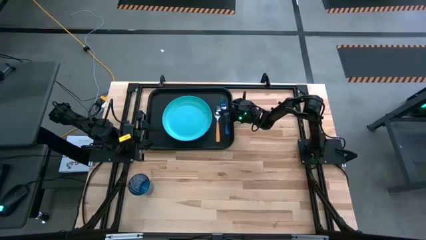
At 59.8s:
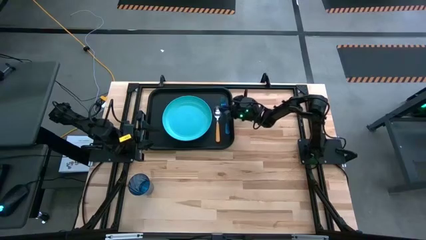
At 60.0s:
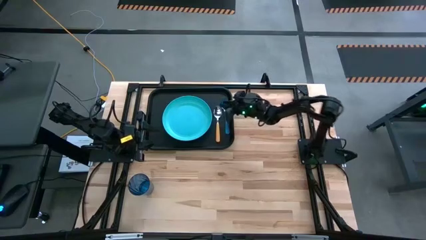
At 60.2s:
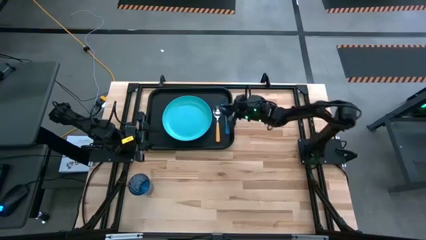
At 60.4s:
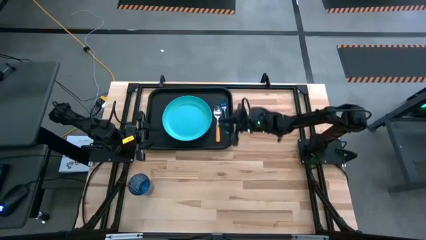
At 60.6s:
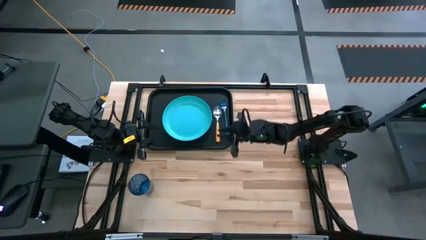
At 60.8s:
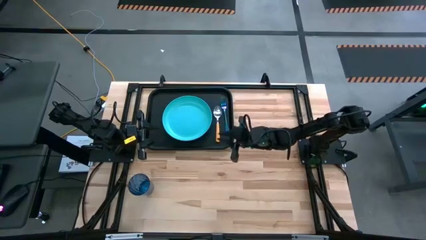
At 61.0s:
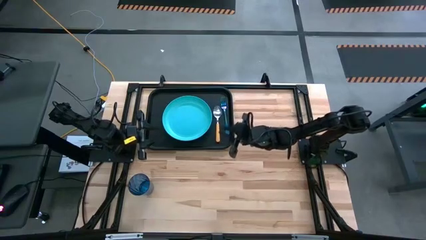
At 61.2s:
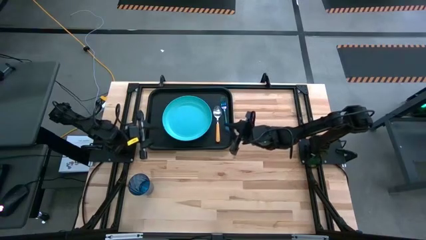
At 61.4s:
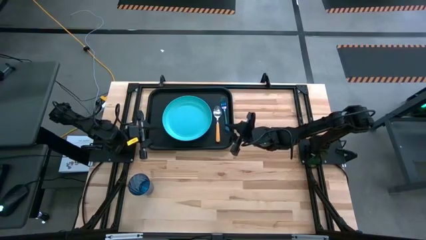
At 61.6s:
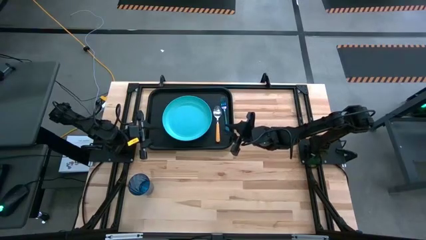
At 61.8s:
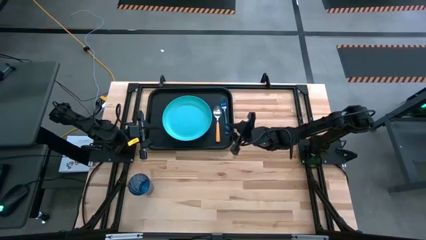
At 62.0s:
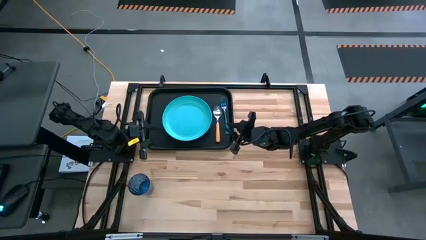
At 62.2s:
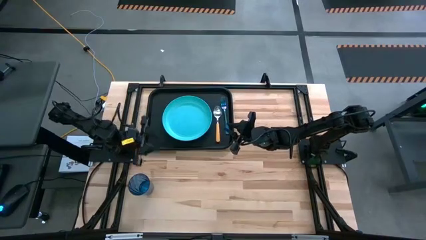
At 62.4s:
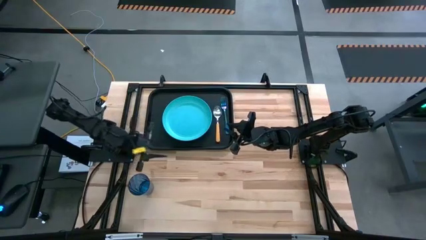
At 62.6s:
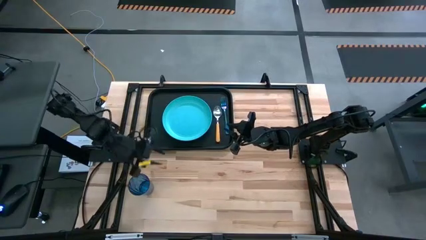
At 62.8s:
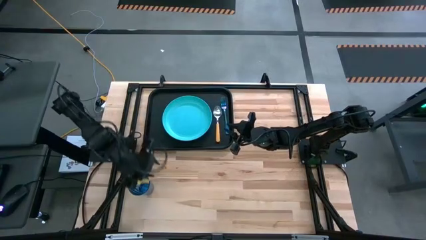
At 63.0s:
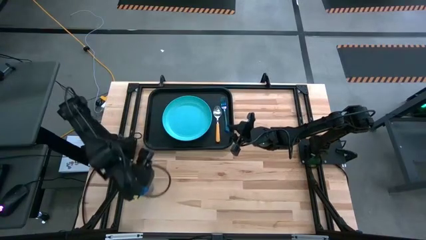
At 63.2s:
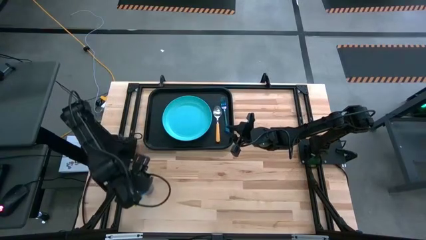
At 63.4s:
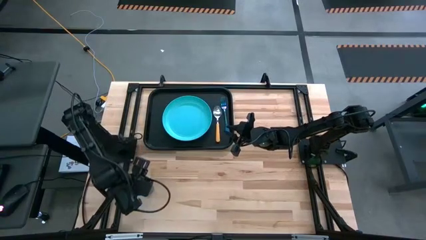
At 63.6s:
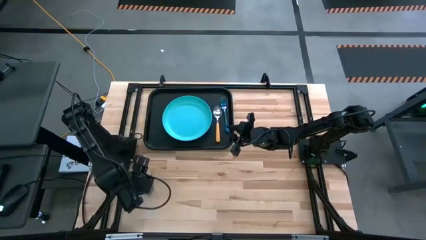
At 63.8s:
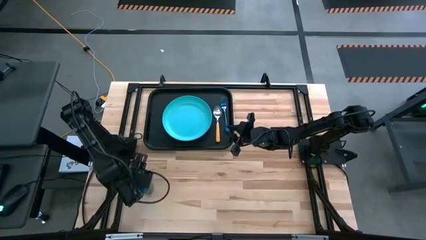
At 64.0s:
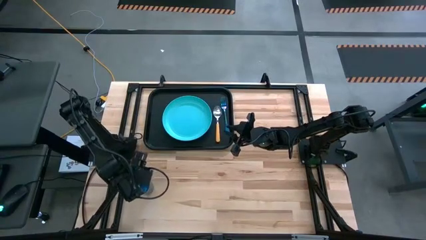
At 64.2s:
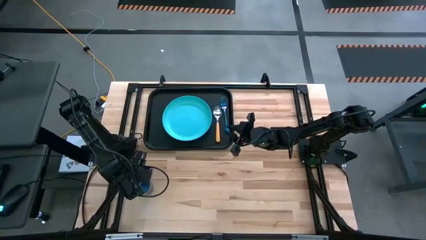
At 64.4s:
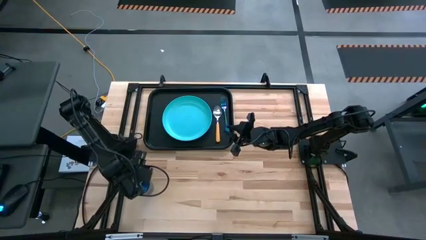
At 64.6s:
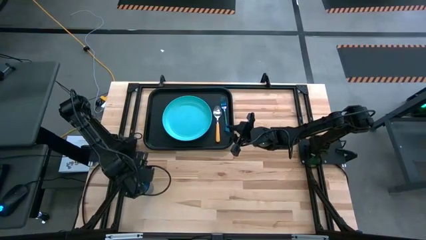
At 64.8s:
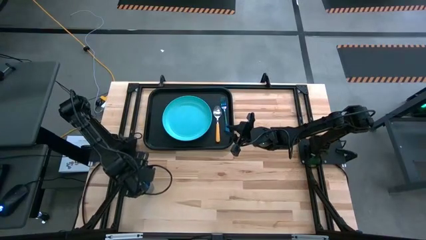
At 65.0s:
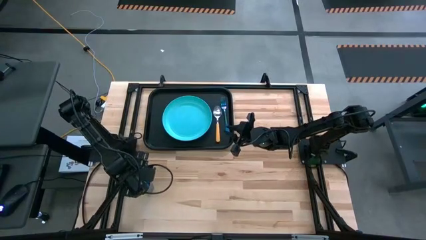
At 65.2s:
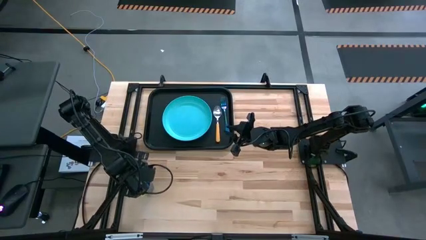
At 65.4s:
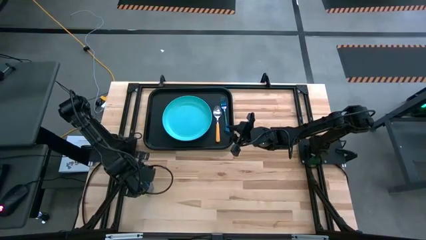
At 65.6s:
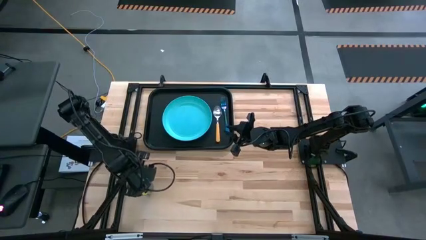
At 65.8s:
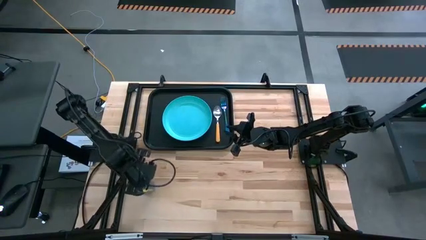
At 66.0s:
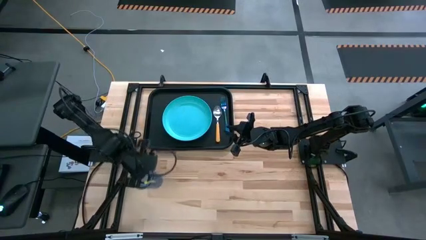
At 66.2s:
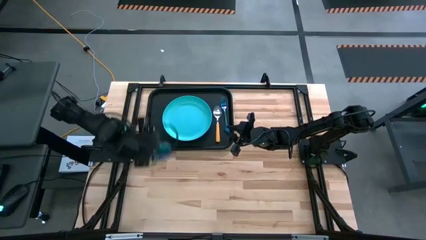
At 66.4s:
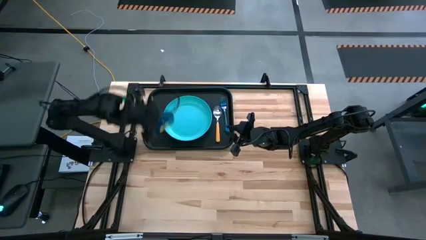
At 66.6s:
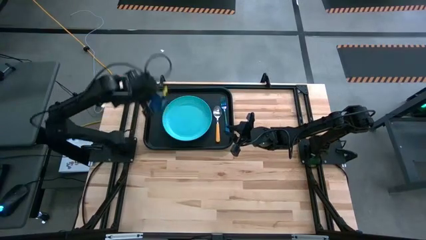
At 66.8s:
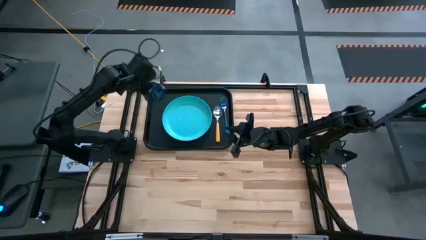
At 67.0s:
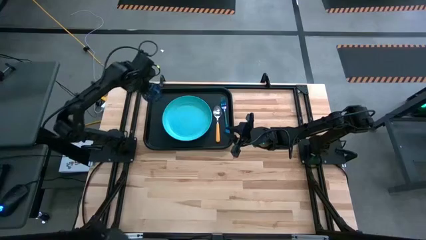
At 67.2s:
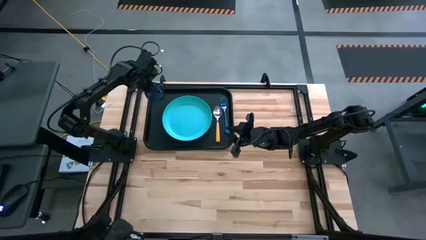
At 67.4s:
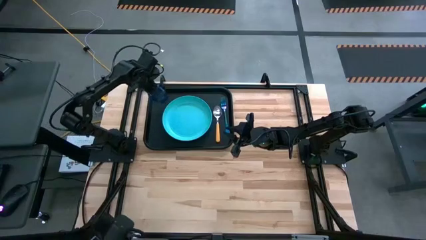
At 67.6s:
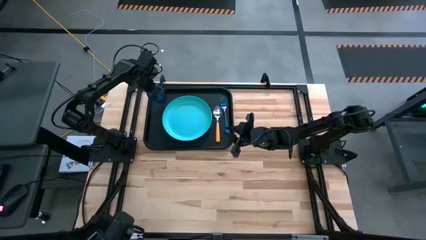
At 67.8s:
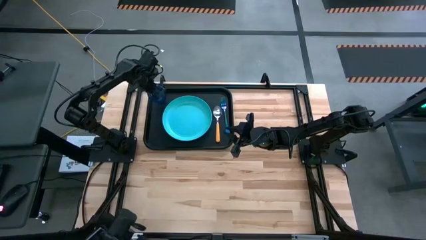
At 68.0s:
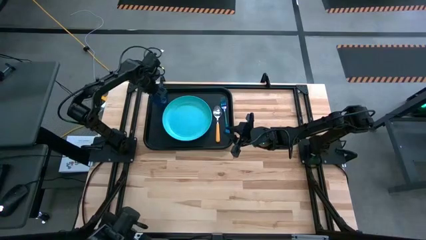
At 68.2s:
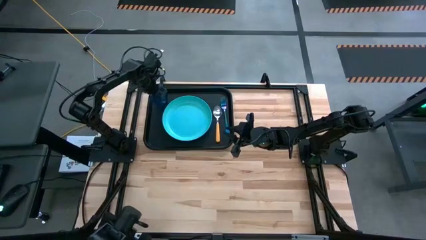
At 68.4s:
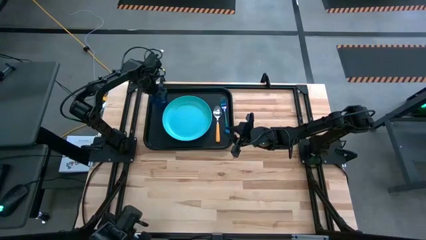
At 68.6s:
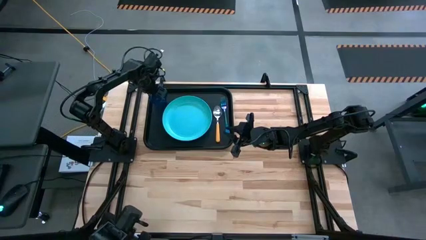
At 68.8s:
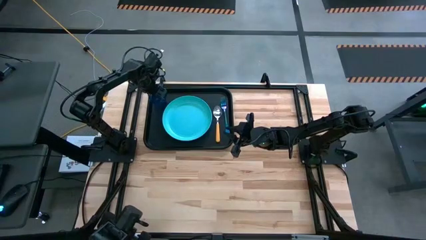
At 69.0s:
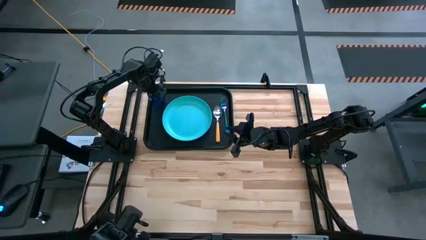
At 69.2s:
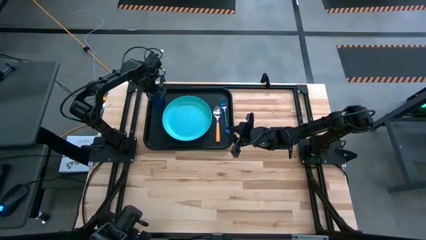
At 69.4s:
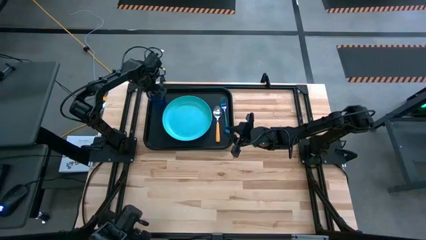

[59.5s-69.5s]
Task: Pick and place plate/cup/fork/spoon on tray
Put the blue glass on the black serving tray

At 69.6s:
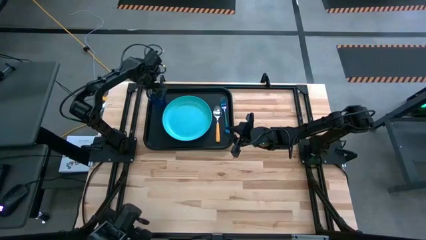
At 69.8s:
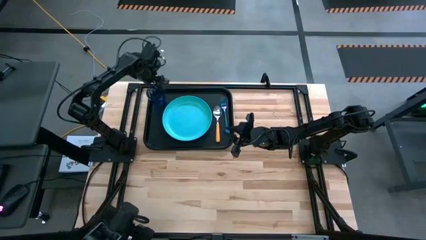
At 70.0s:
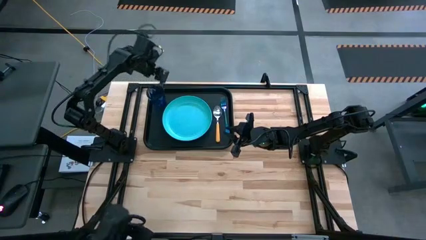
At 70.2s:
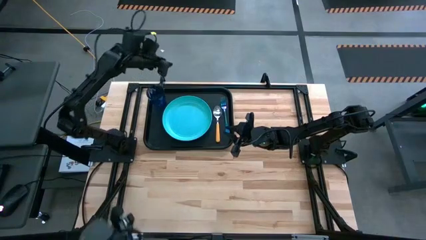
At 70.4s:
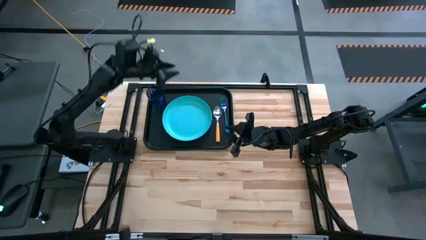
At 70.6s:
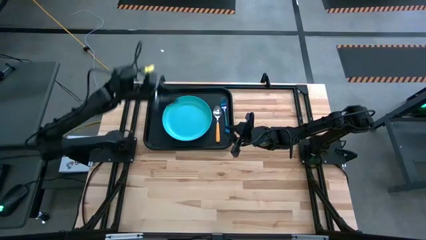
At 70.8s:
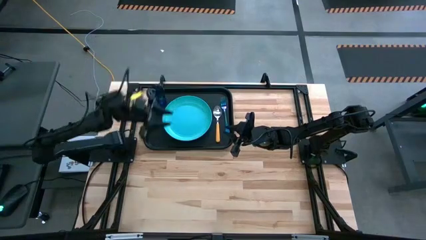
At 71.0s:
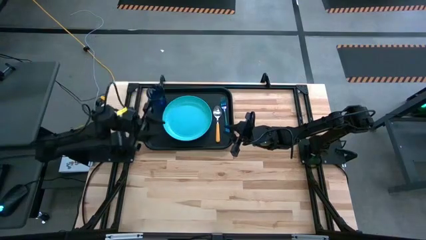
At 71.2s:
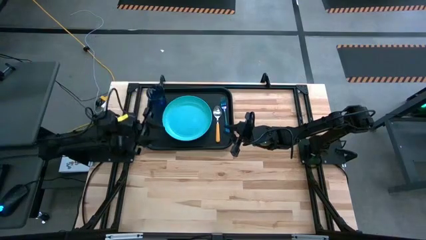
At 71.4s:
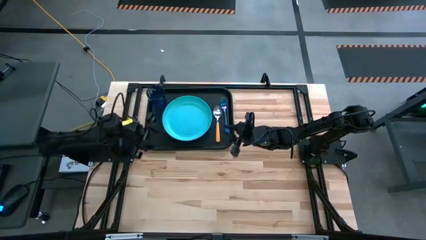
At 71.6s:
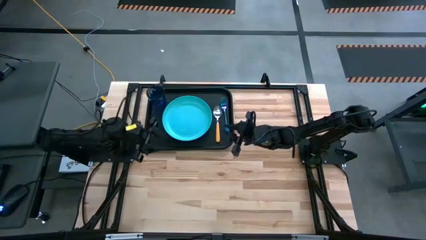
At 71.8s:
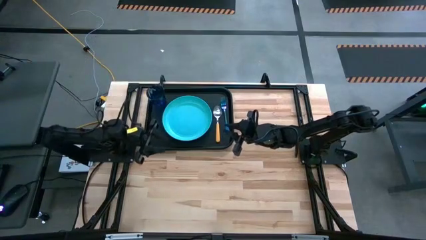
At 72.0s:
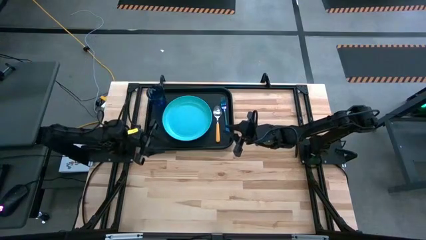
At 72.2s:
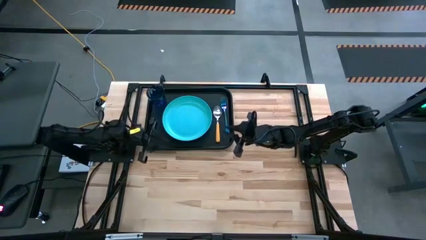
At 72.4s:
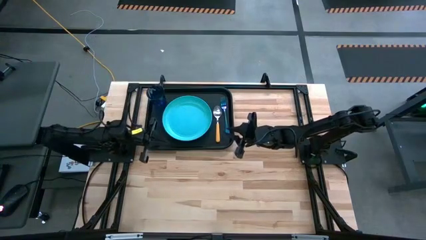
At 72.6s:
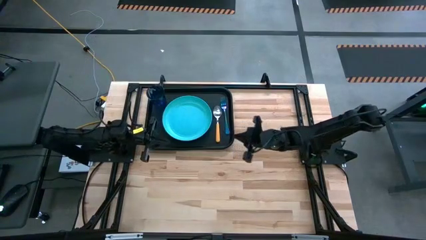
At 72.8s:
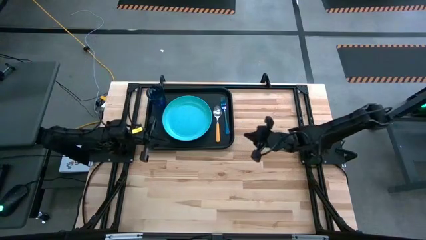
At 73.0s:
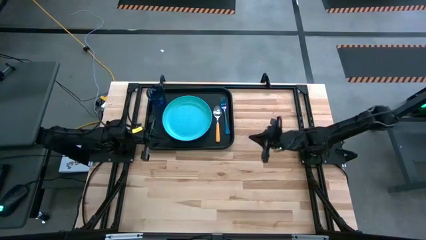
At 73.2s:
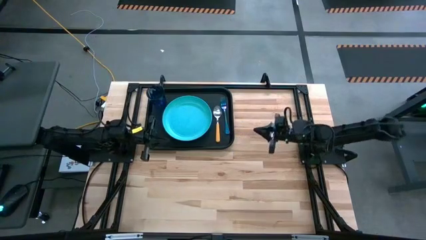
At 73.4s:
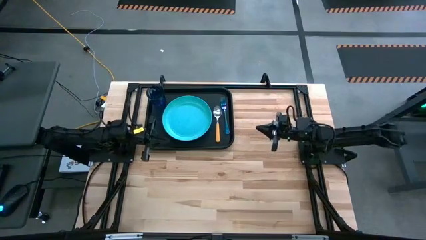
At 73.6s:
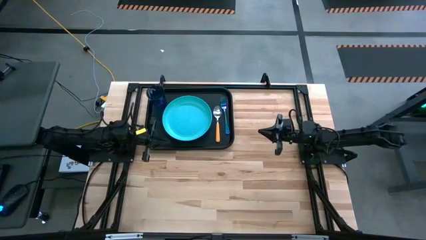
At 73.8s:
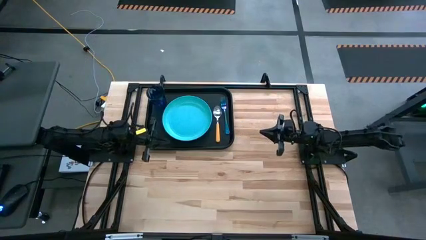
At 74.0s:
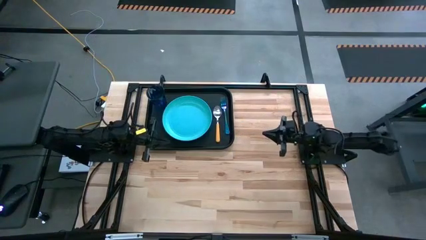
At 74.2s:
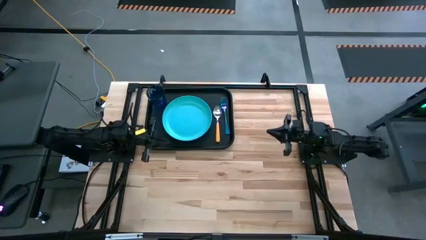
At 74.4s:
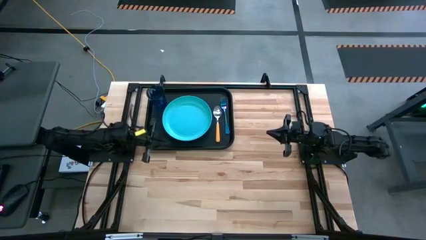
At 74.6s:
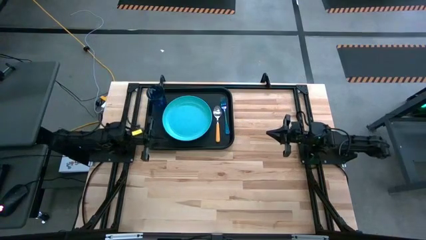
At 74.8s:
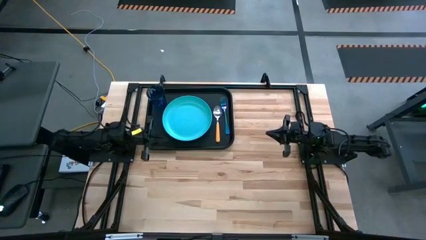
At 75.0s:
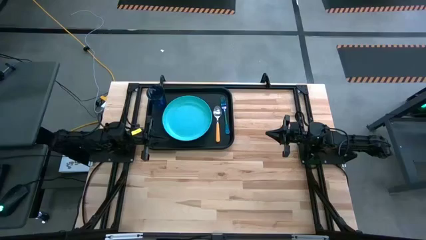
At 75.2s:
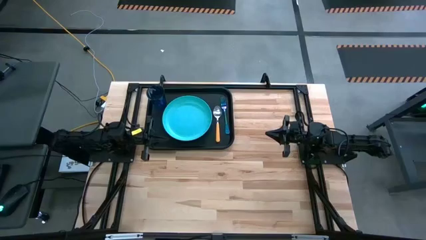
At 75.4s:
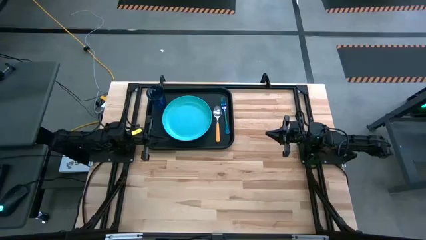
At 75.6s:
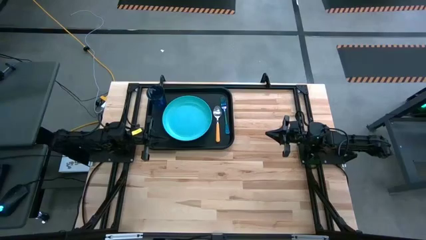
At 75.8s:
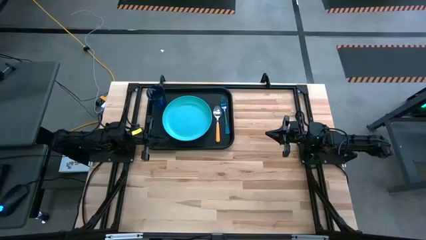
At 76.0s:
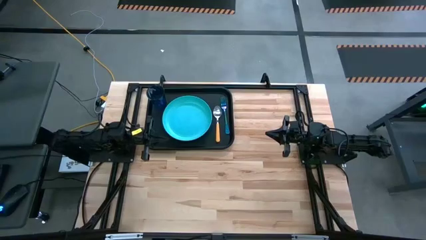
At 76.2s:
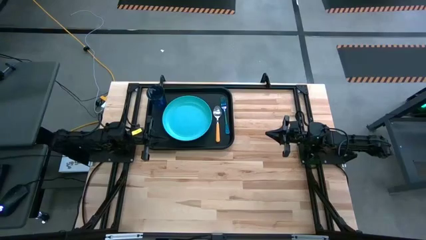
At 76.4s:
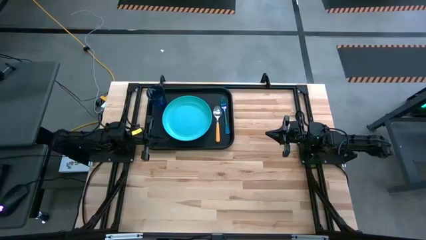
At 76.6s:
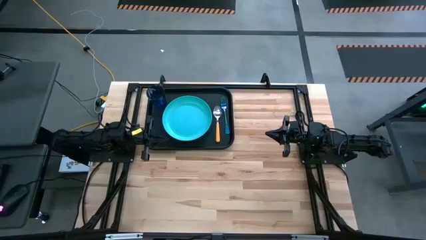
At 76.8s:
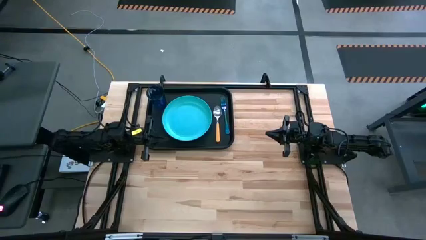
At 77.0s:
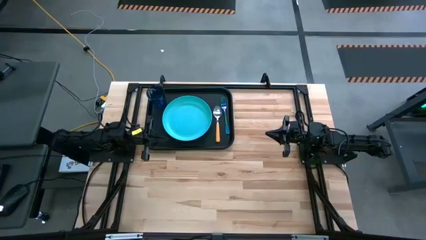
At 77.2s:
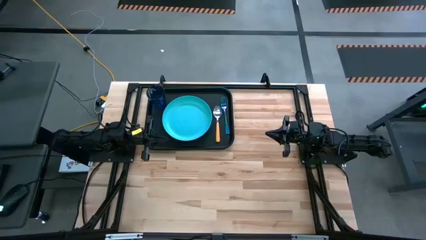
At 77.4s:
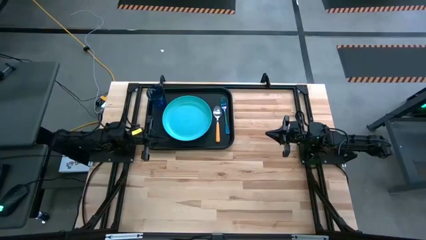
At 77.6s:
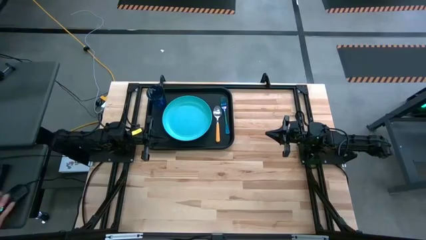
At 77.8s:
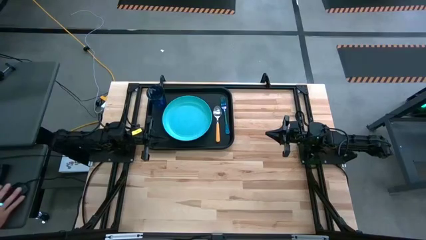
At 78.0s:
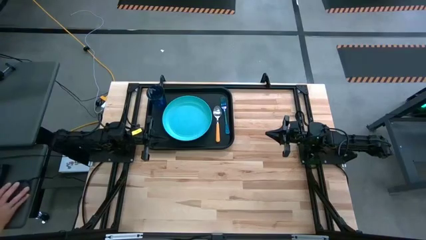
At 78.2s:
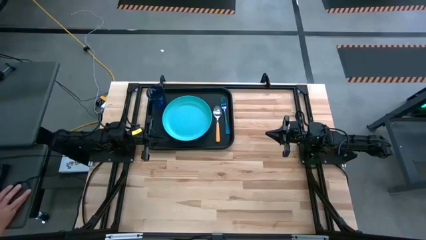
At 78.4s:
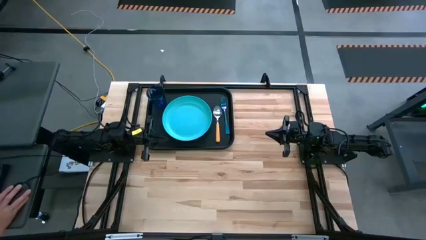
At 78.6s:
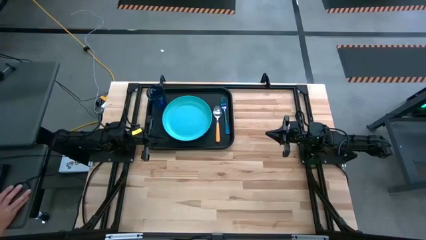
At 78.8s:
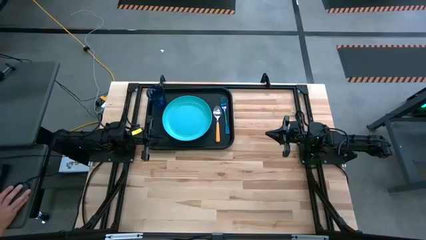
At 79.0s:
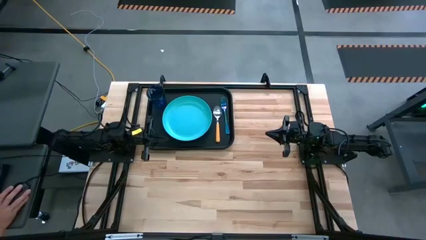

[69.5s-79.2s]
Return to Home Position
